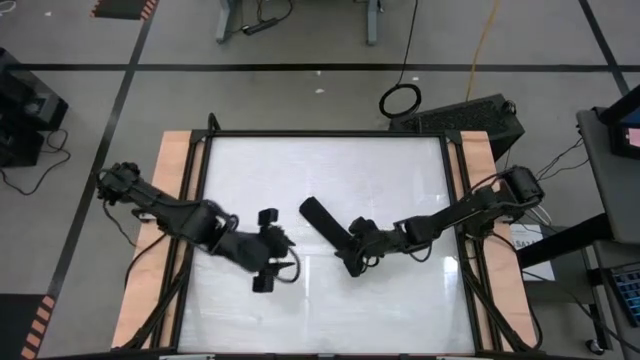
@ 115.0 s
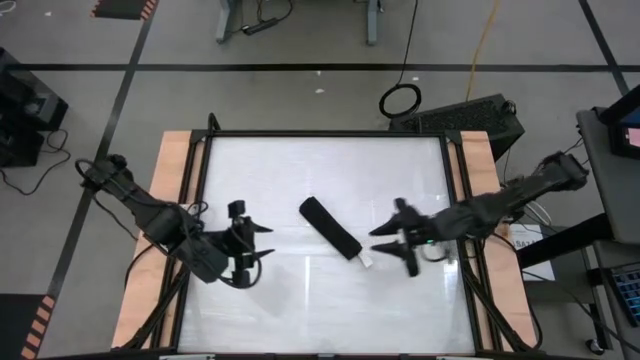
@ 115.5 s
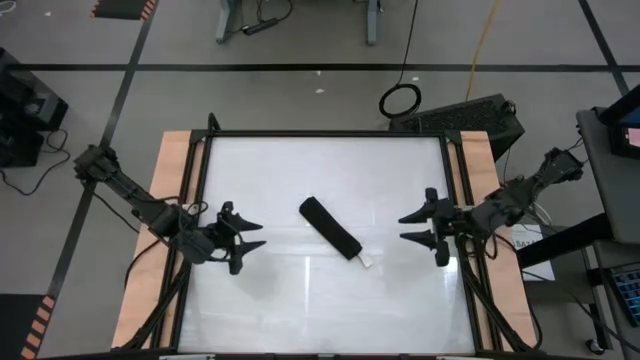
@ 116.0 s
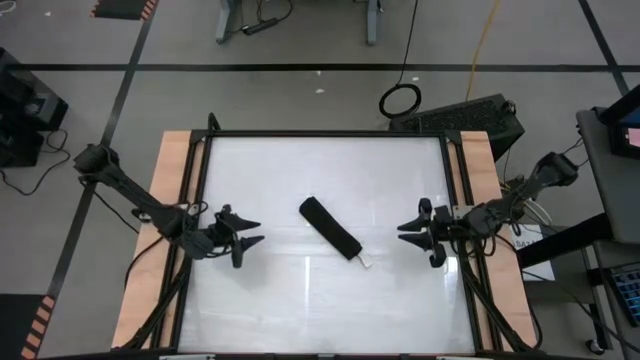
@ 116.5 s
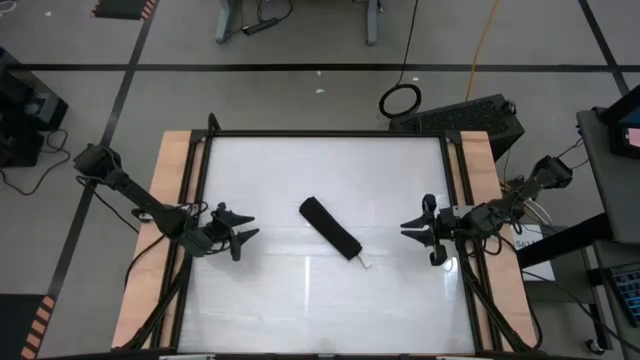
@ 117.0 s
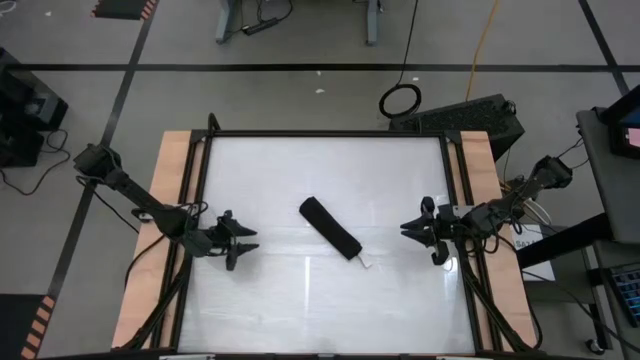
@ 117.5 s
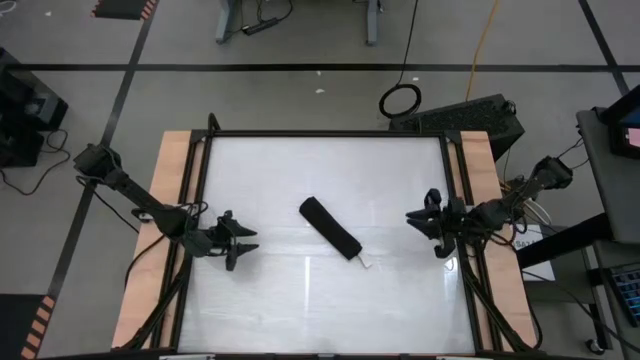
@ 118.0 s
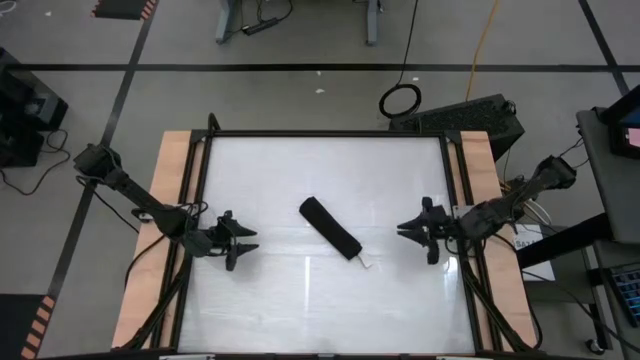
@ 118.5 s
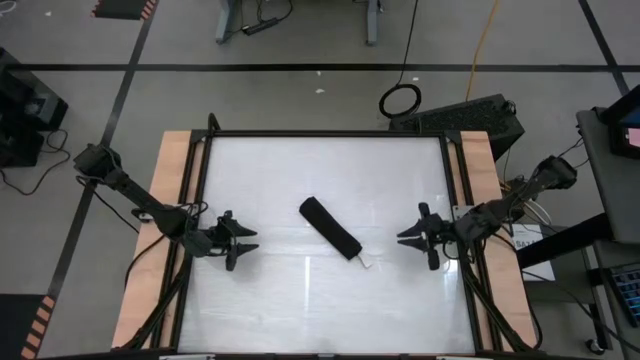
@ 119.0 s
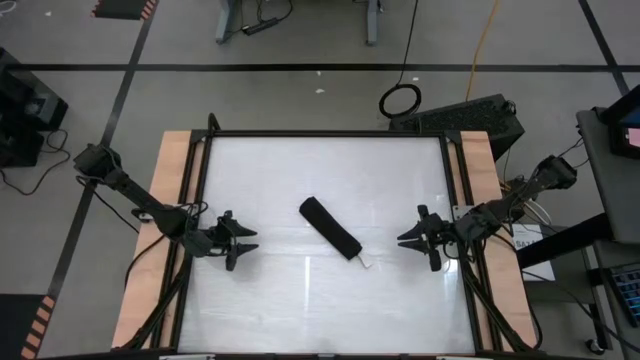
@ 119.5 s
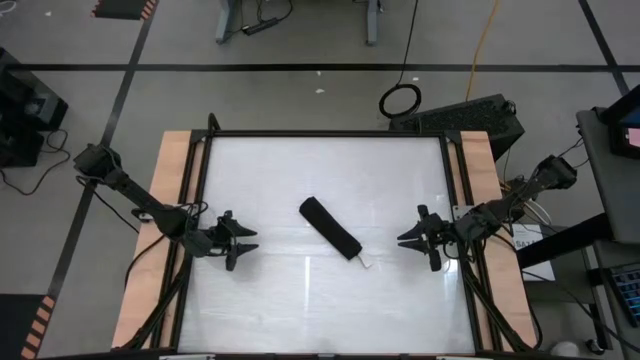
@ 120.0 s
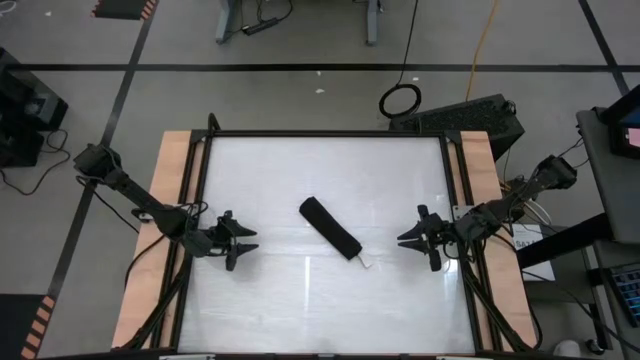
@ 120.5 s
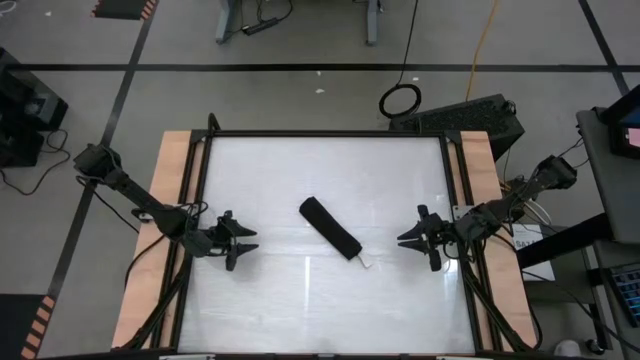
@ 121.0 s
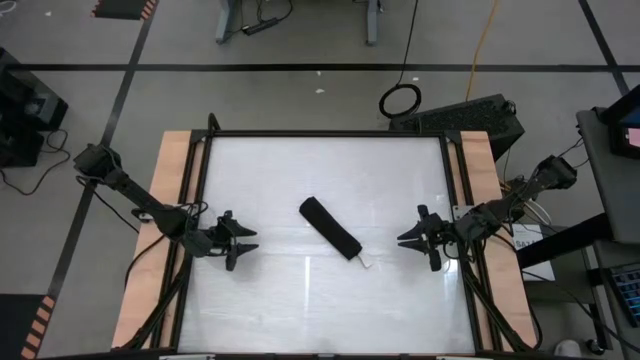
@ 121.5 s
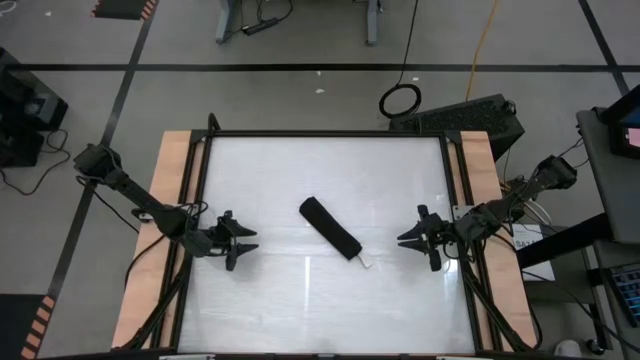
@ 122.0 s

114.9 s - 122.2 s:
Task: Roll towel into tight, uniform cylinder
Return to Home Position

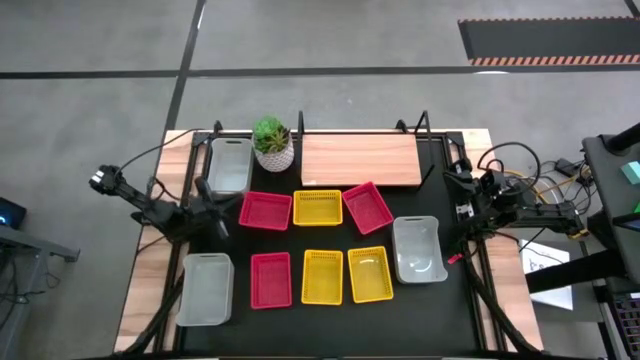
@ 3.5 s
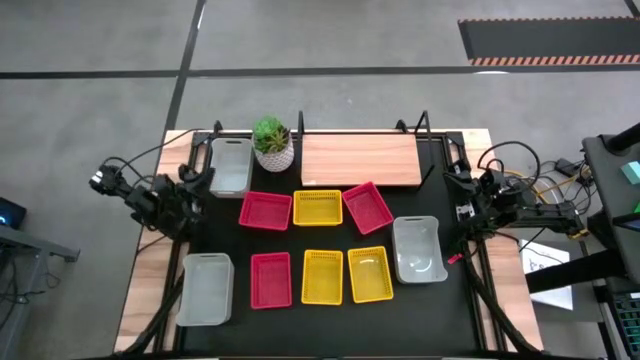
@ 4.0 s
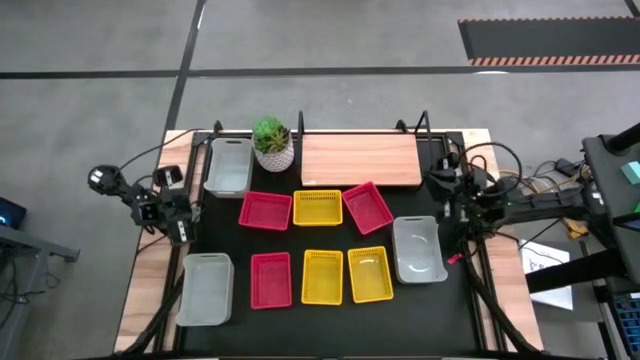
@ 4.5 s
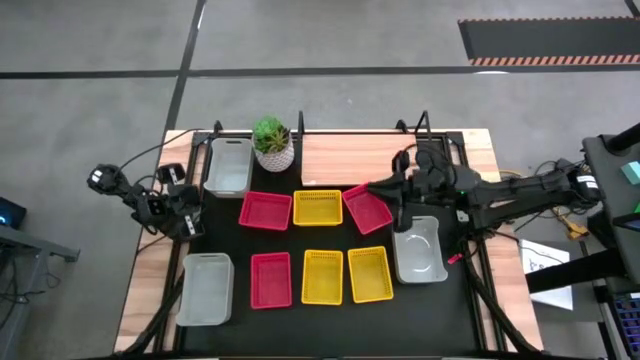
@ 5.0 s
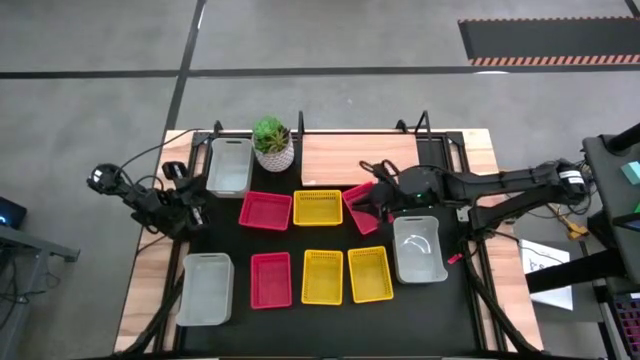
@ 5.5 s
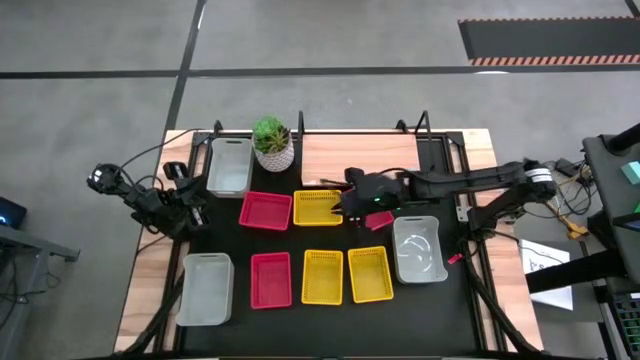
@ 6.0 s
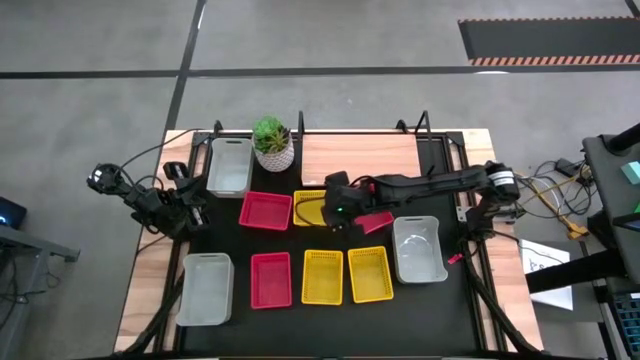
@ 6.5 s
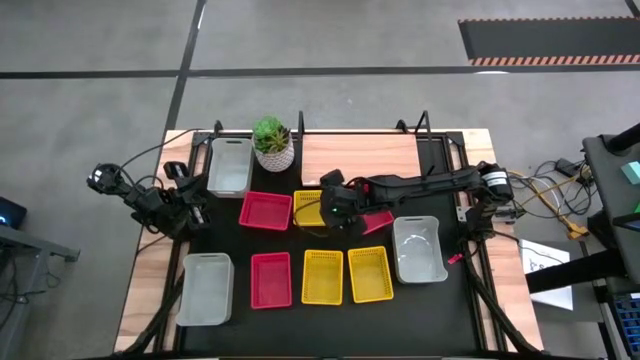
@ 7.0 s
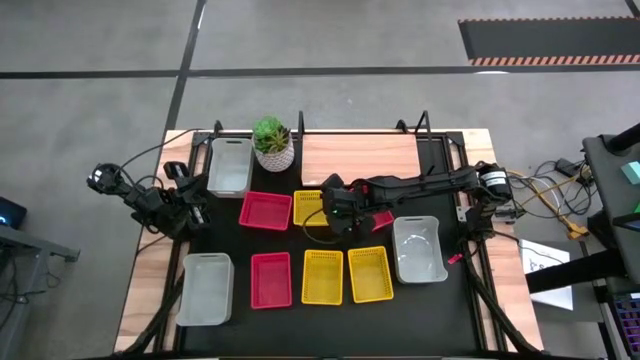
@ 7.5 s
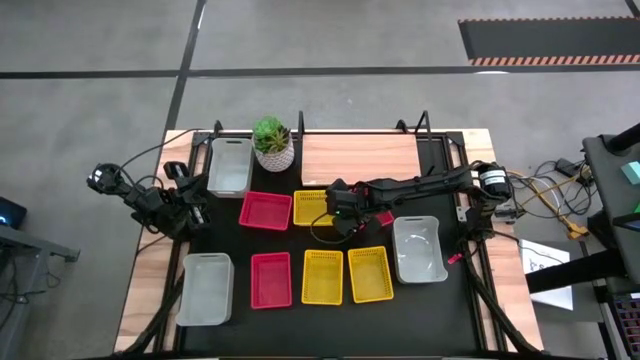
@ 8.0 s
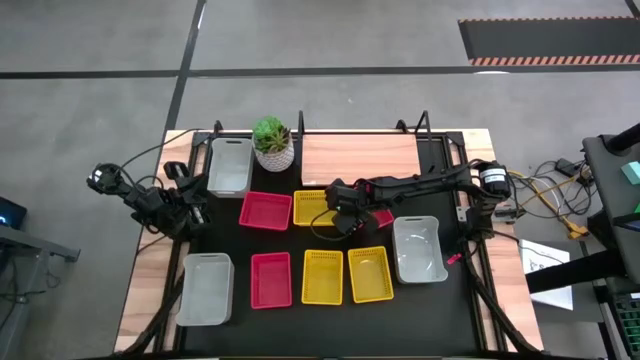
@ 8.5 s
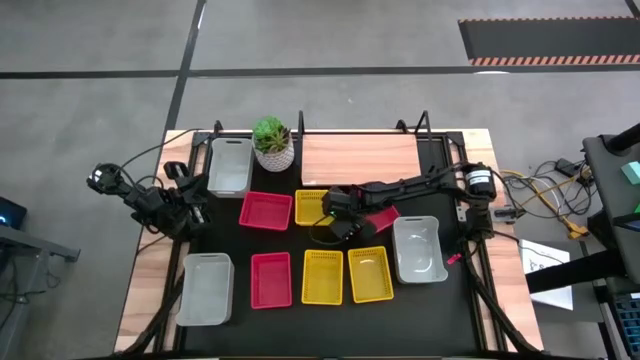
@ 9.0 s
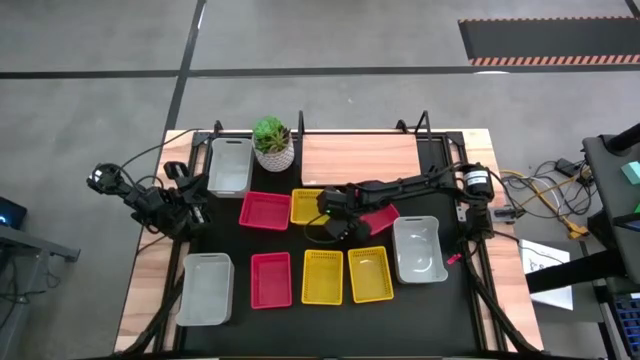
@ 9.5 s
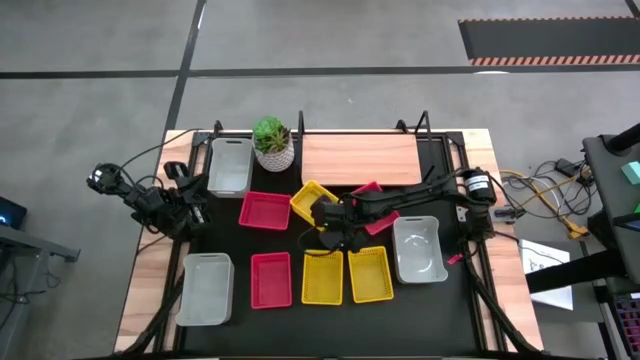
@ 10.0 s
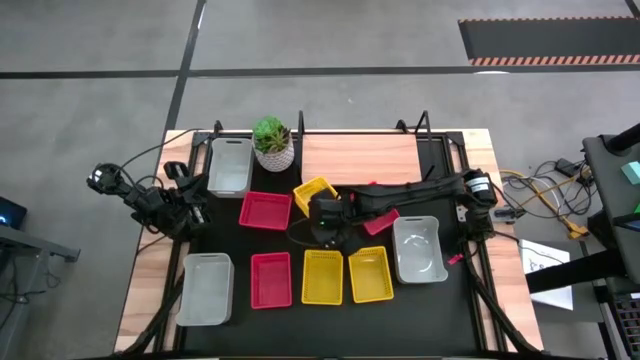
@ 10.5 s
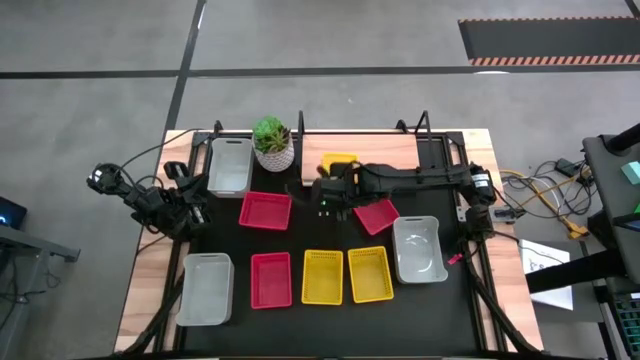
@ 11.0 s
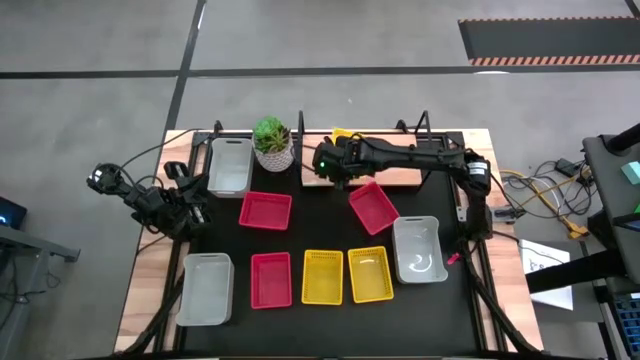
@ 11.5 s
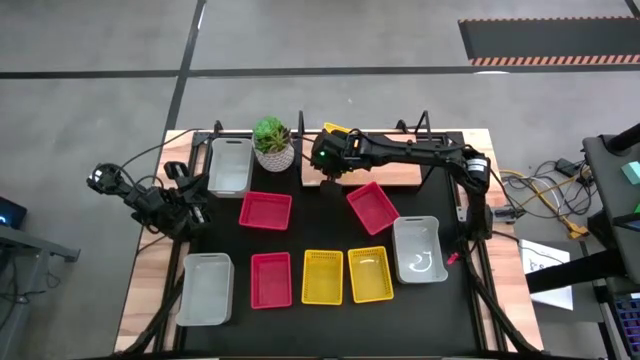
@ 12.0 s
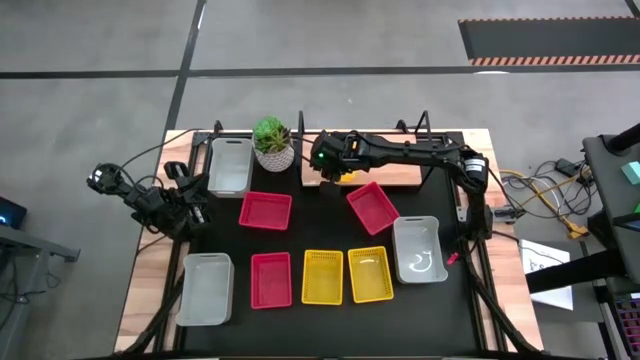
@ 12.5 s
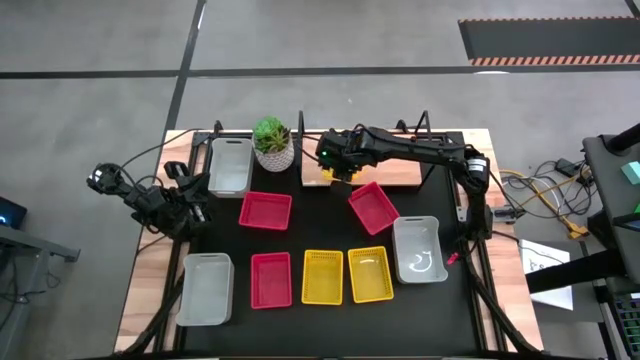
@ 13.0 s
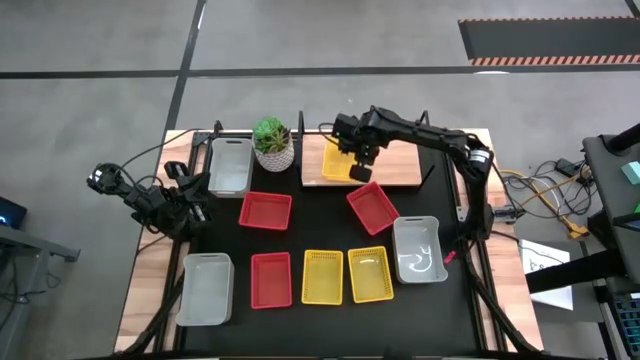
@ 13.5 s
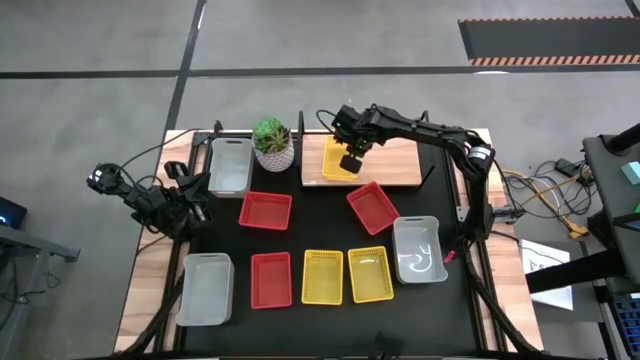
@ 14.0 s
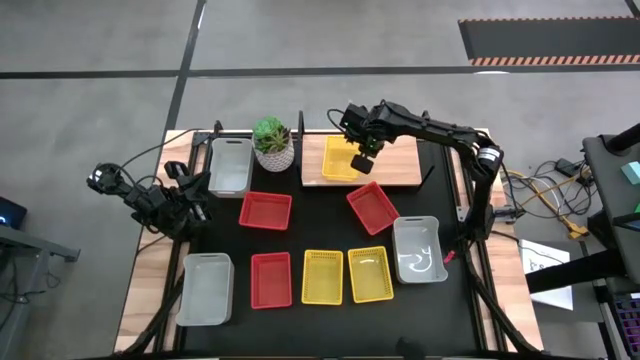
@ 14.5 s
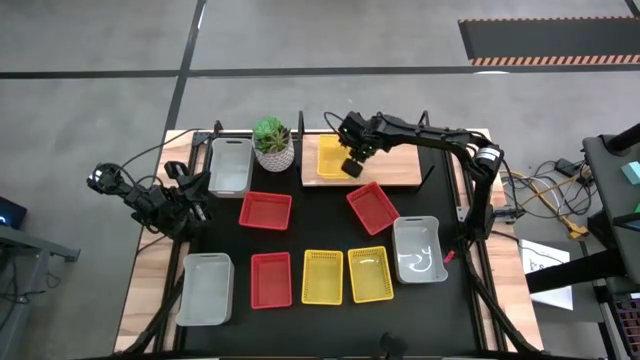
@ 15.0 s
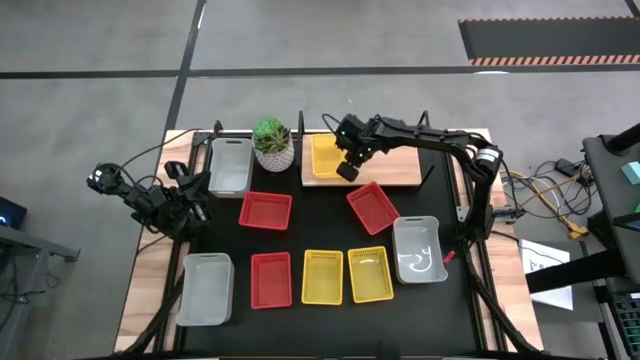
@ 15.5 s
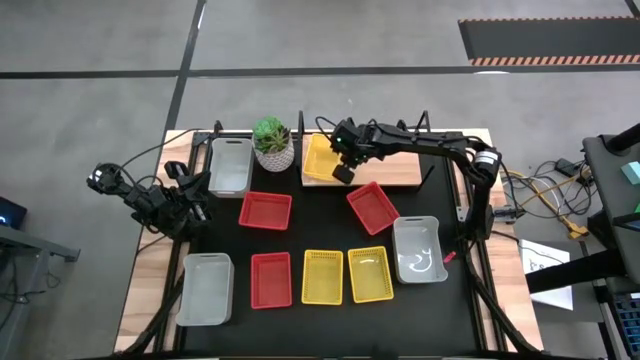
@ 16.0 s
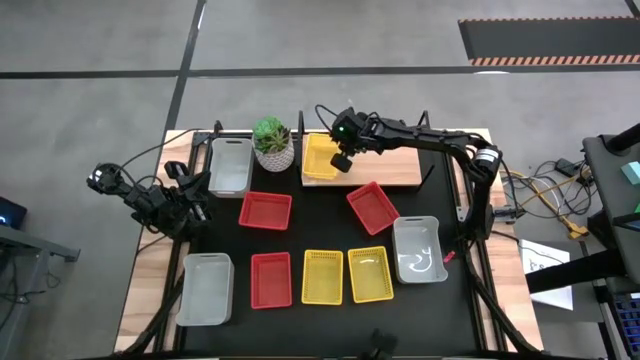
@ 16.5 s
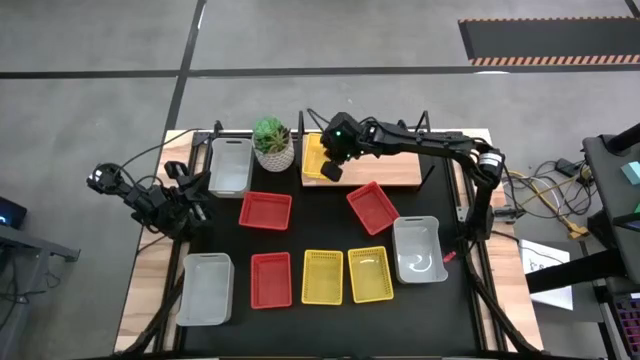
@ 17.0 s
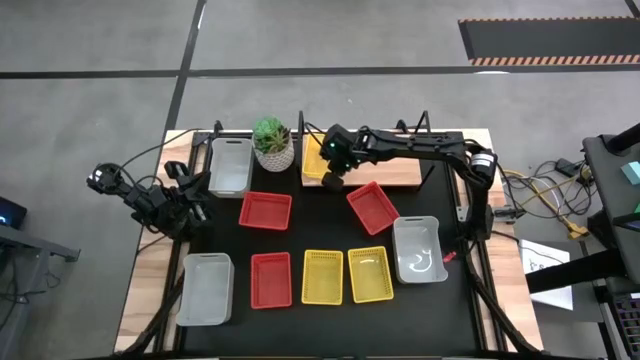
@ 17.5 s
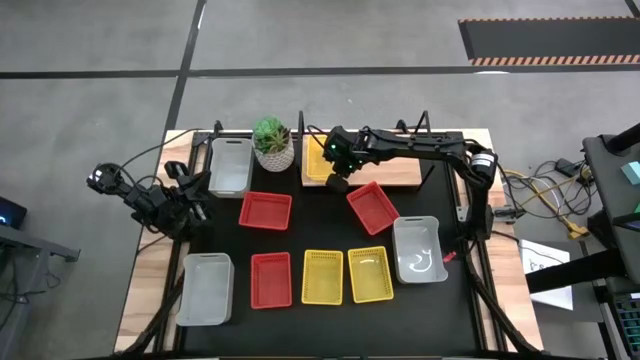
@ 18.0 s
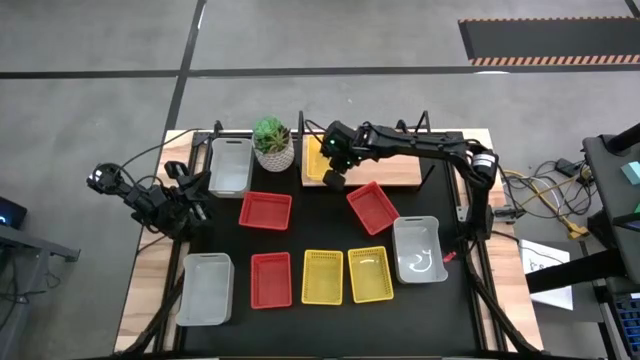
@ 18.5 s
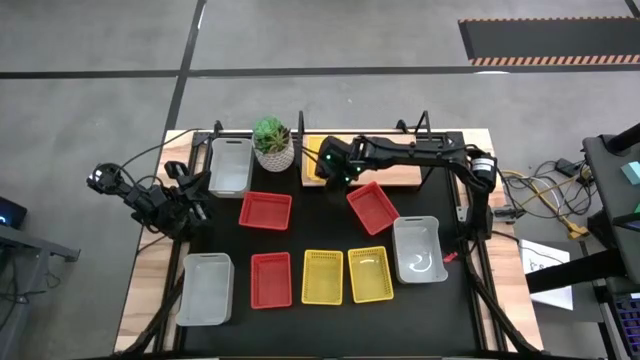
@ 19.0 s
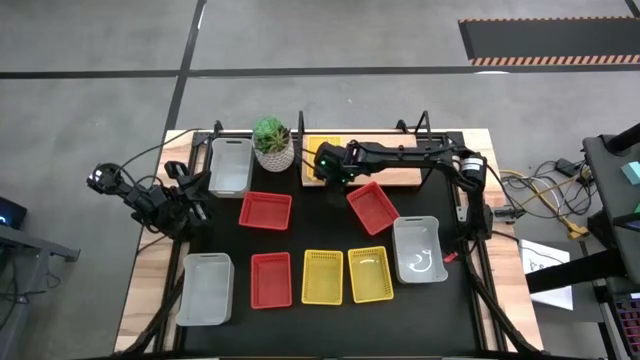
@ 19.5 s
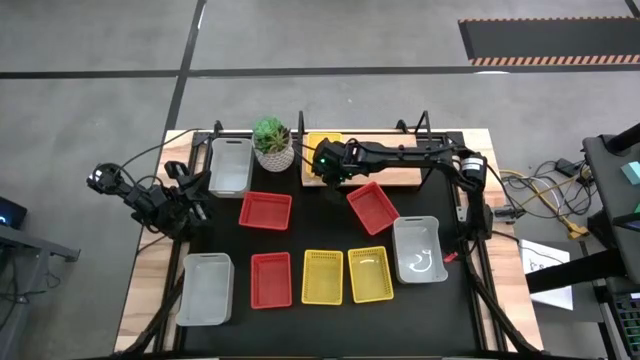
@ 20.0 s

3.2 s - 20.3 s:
Task: Stack baskets on shelf by color
Put the top yellow bin on the shelf
